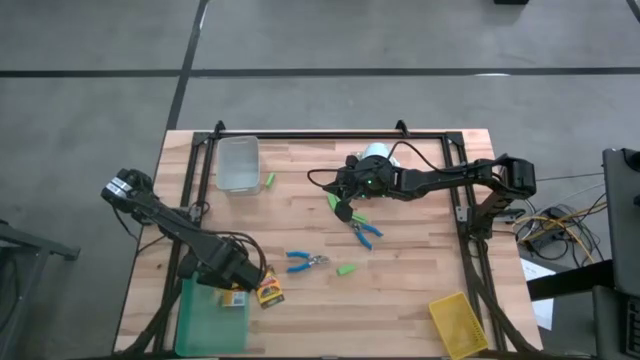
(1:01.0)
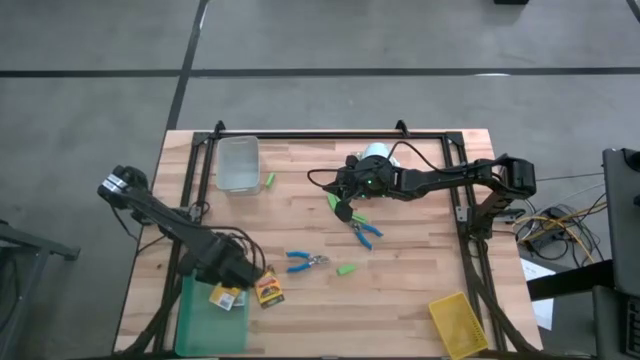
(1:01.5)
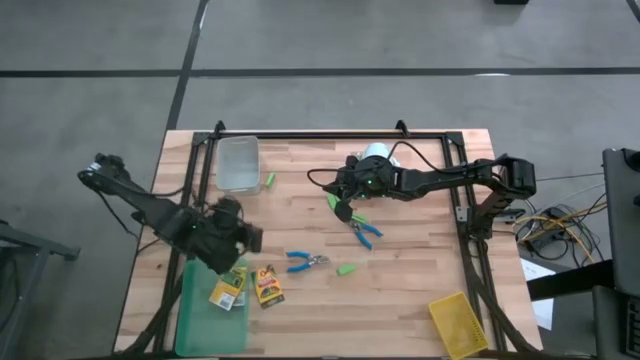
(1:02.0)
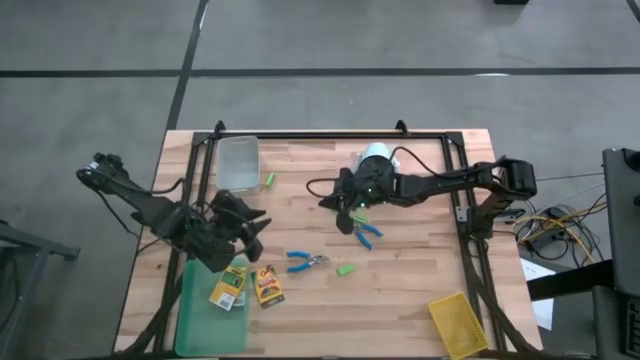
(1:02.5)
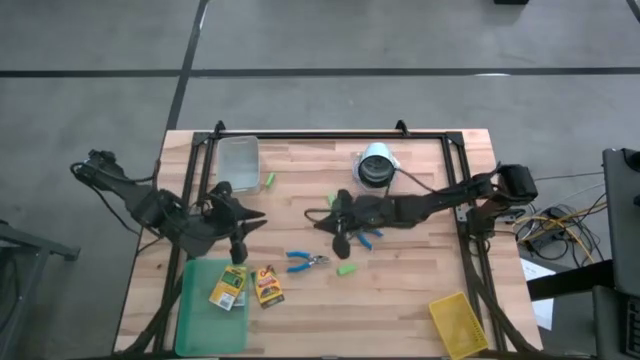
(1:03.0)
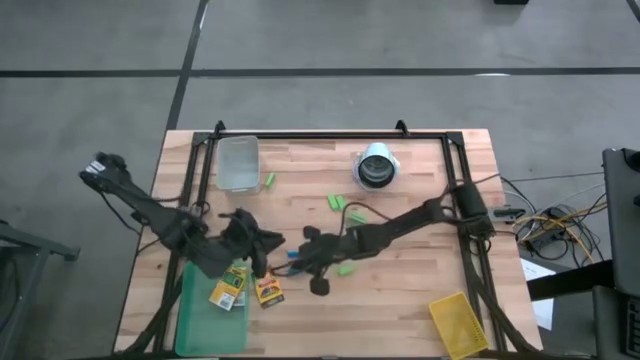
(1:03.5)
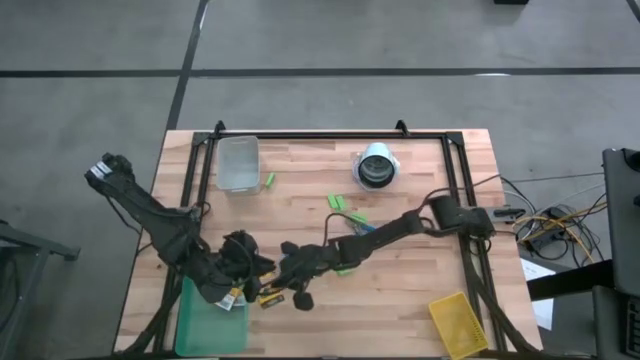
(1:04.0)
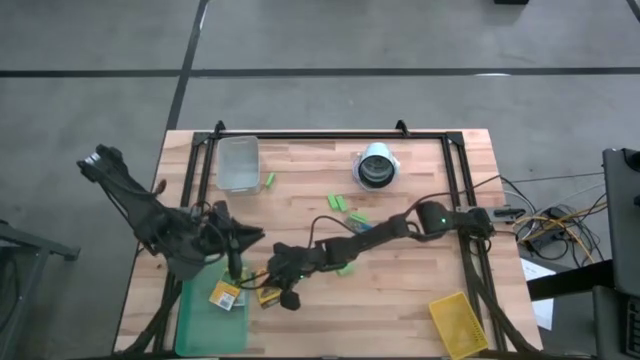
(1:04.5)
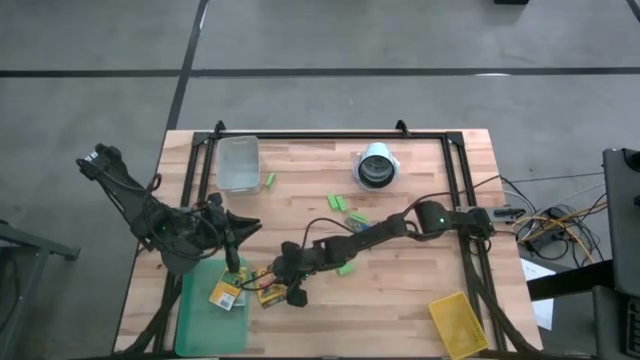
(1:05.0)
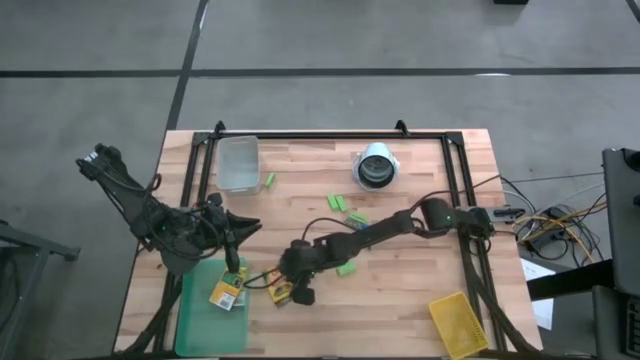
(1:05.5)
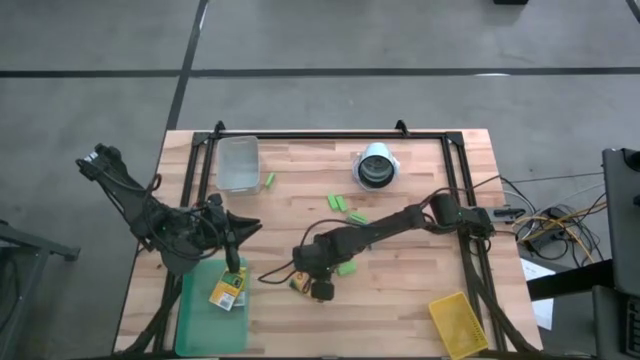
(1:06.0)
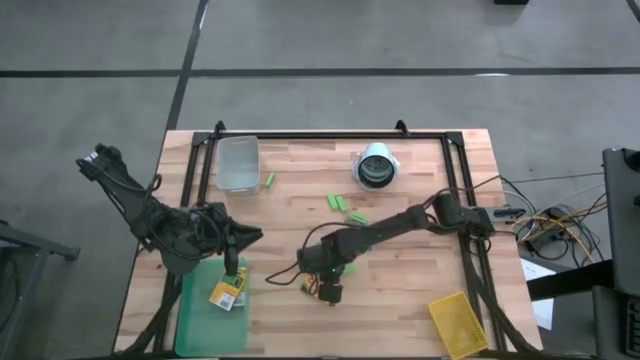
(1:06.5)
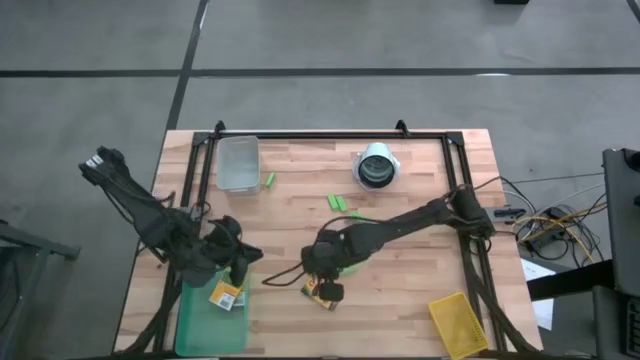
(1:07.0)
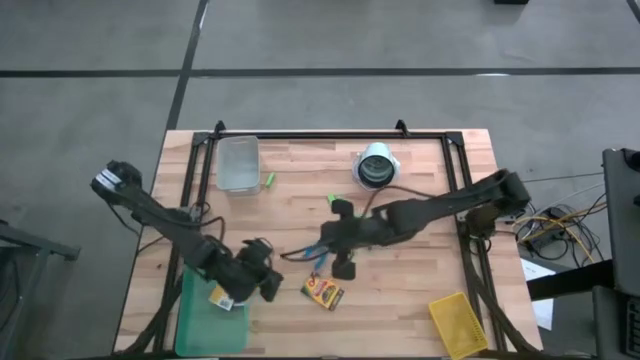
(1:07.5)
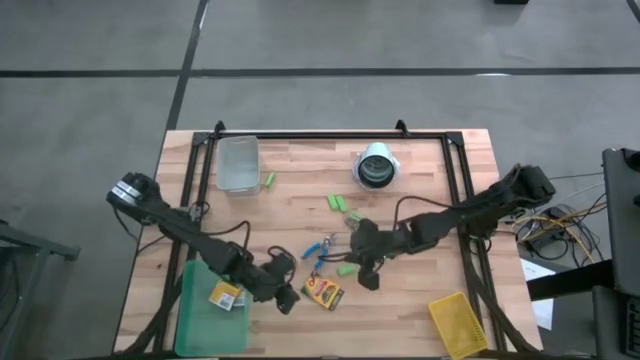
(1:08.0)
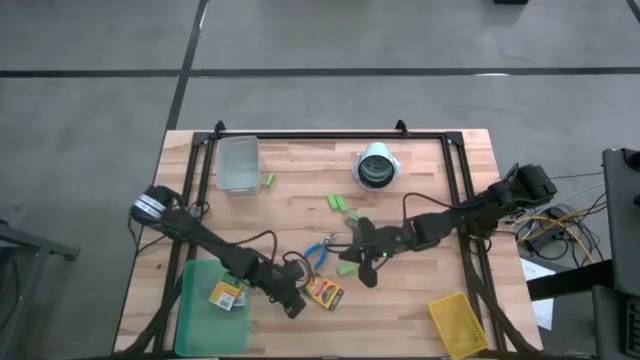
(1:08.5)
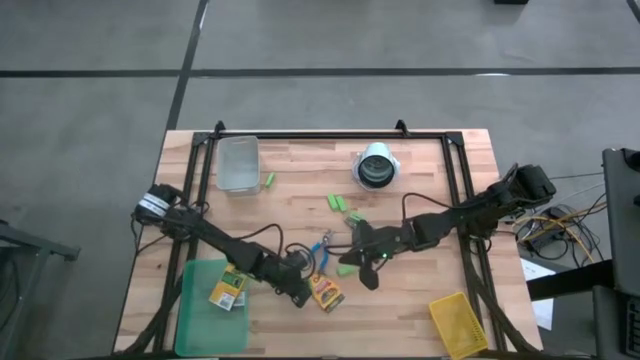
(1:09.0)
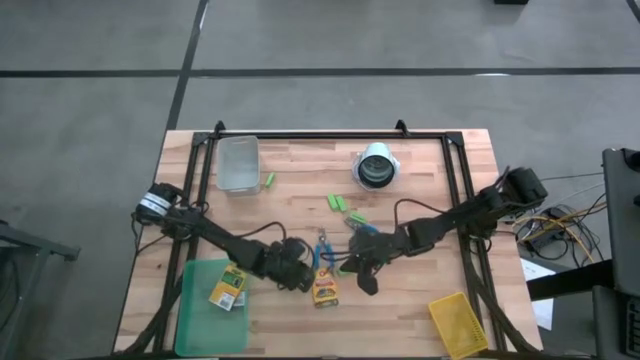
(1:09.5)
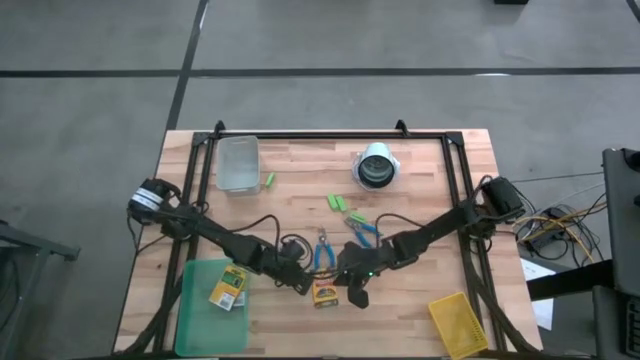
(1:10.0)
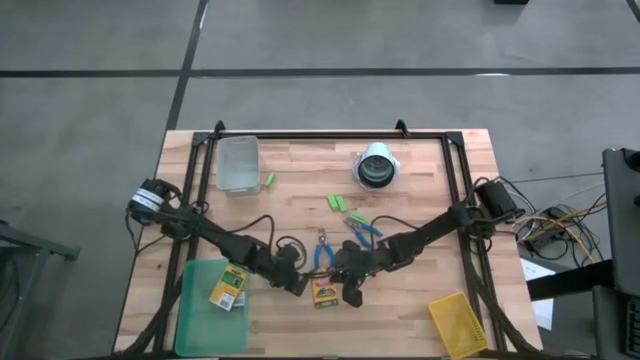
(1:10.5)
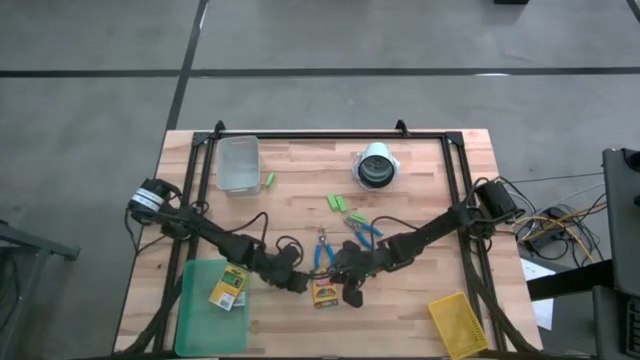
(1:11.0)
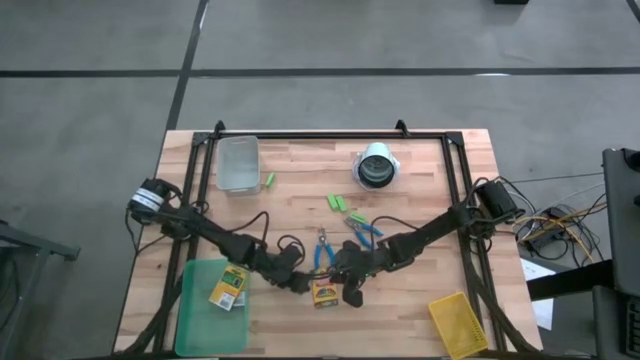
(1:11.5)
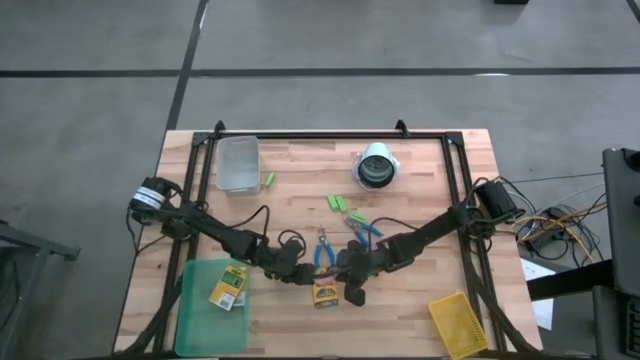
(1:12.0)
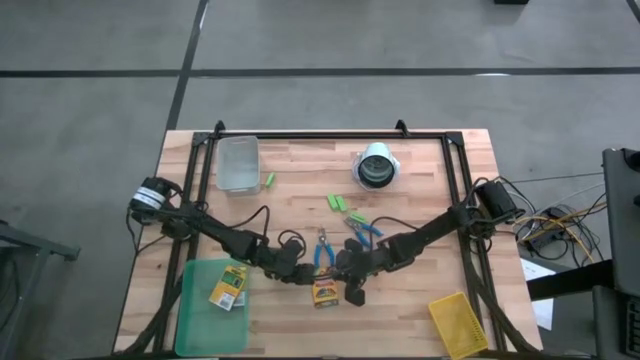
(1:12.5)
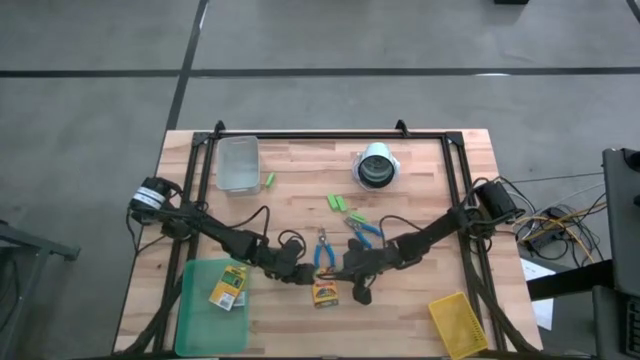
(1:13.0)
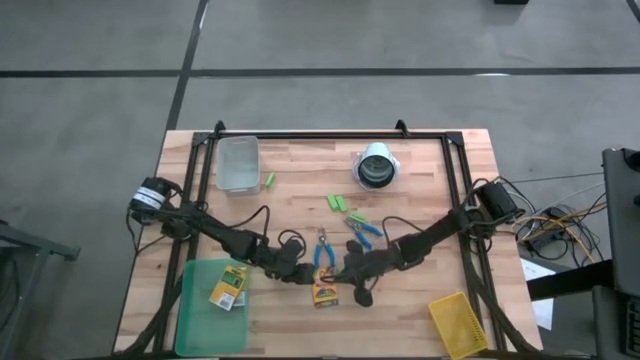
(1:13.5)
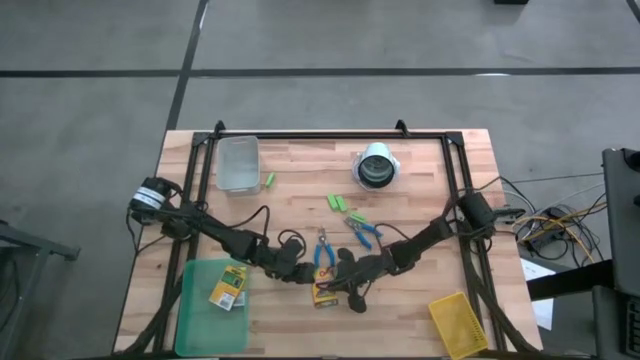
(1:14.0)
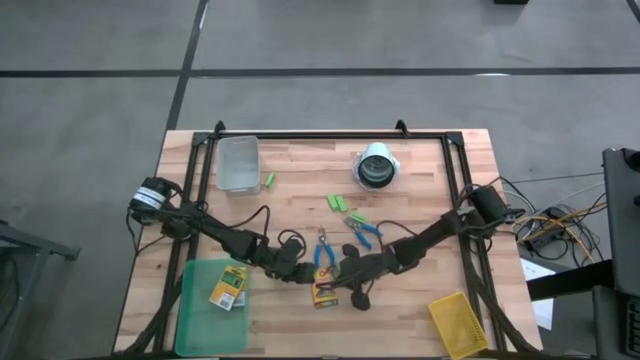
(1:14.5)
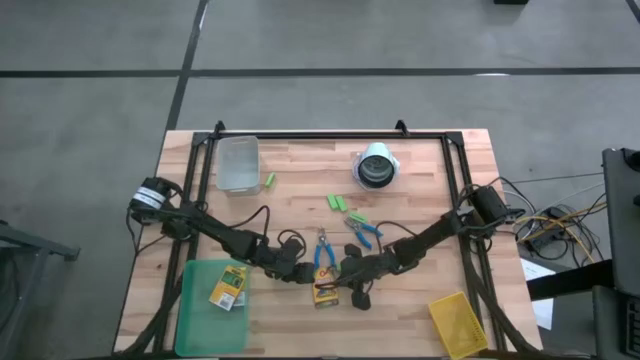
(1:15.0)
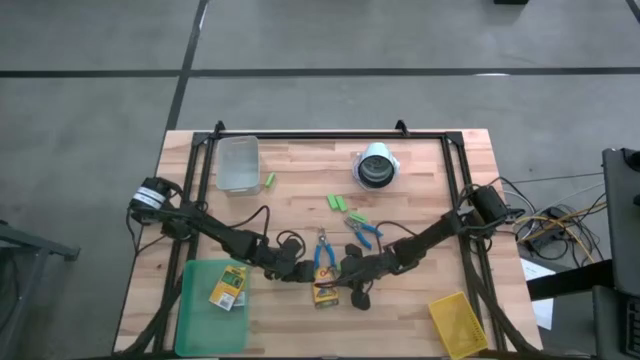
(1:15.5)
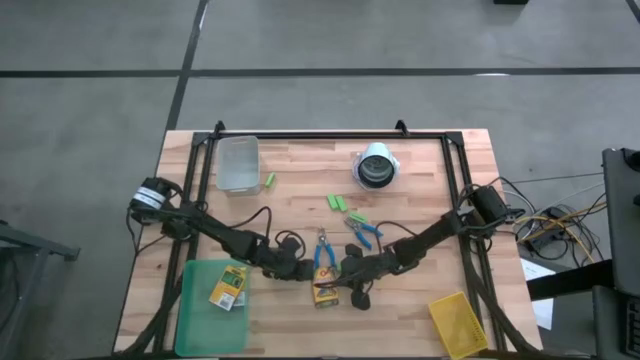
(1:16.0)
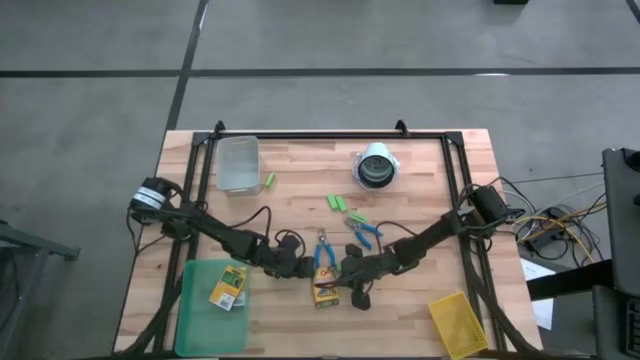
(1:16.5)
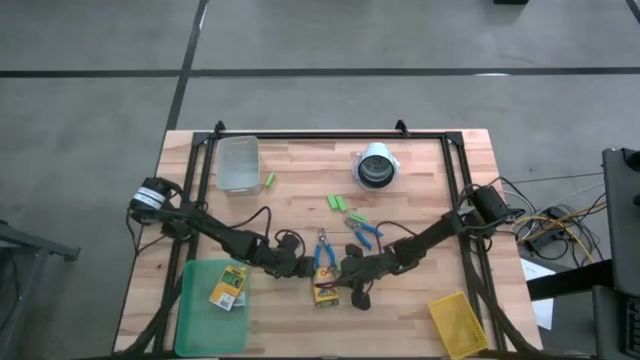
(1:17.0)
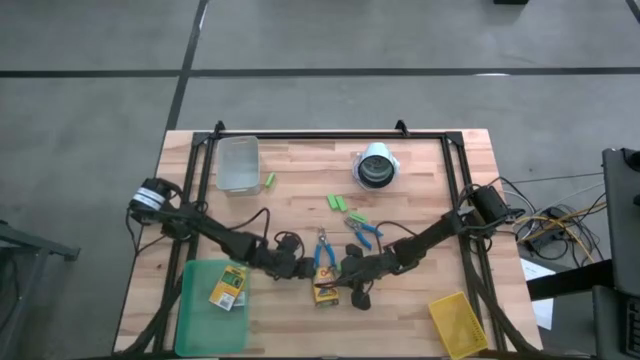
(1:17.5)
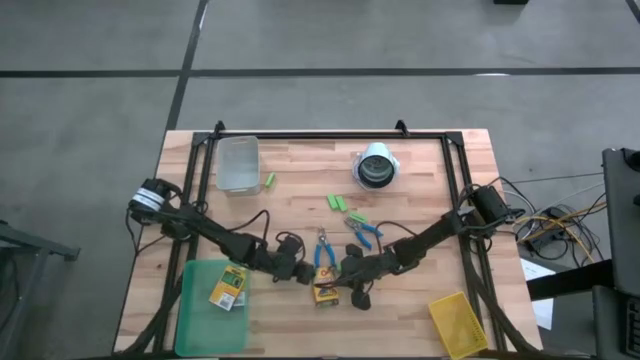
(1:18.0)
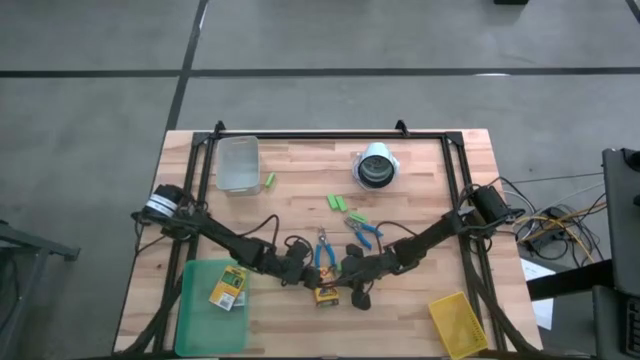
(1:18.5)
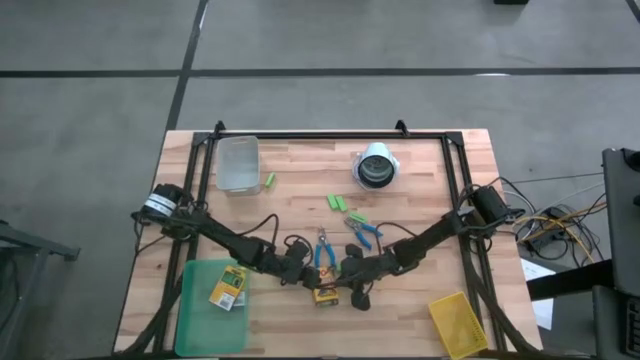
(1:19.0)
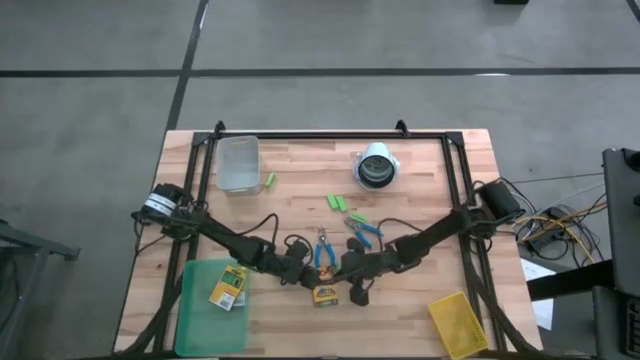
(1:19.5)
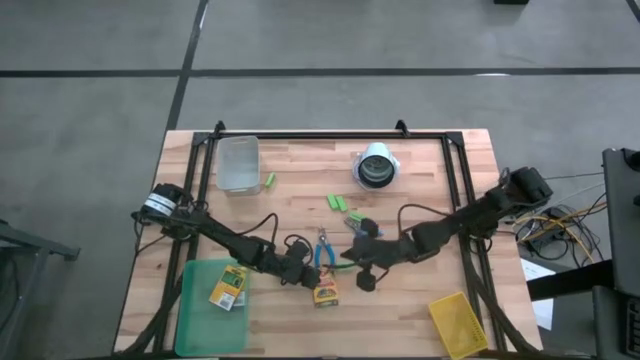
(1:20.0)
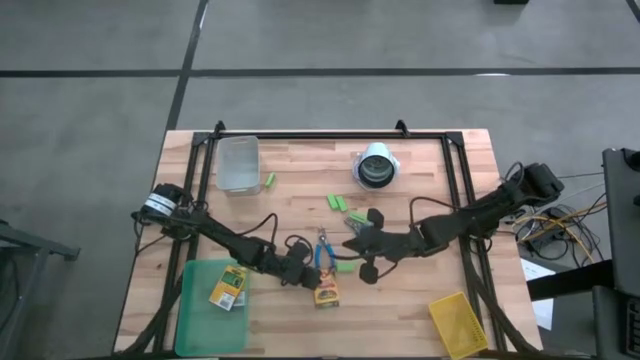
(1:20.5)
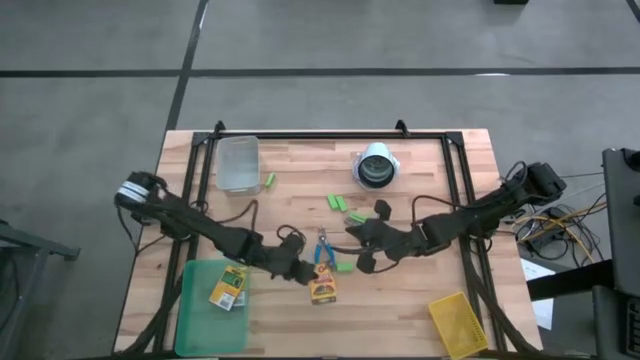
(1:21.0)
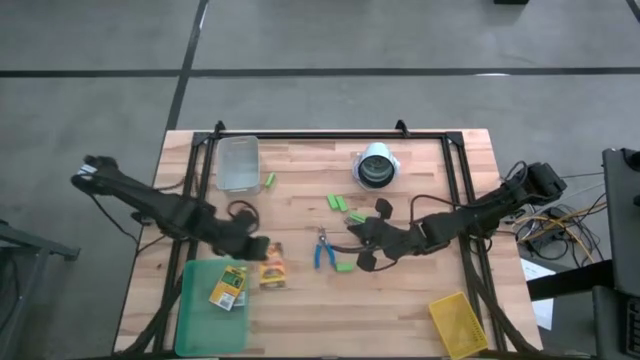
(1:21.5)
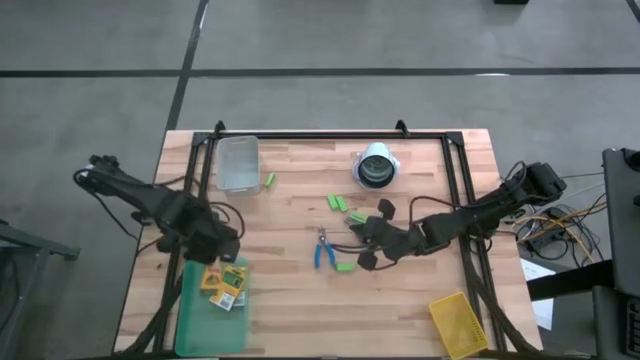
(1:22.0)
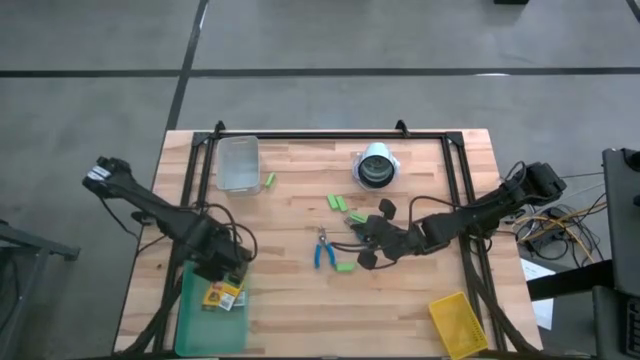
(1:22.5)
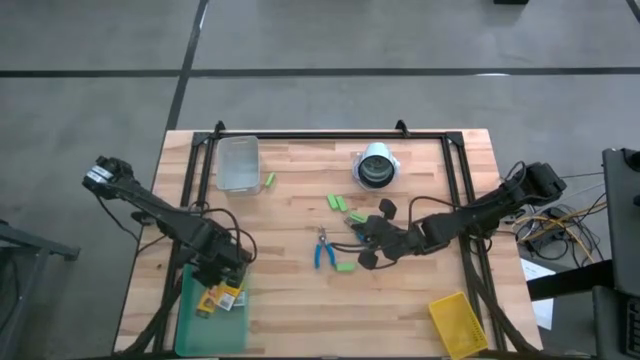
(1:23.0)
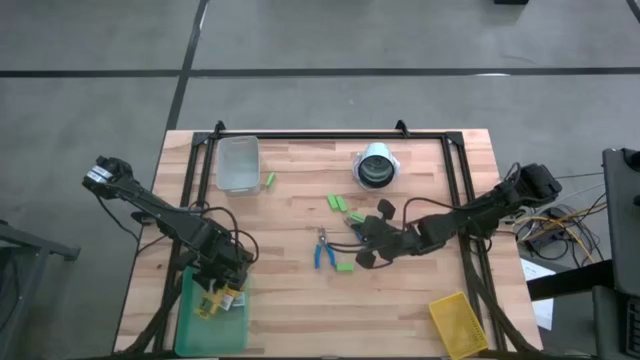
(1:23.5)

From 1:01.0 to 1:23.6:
Task: Pick & Place School Supplies
Put the yellow crayon box into the green bin
